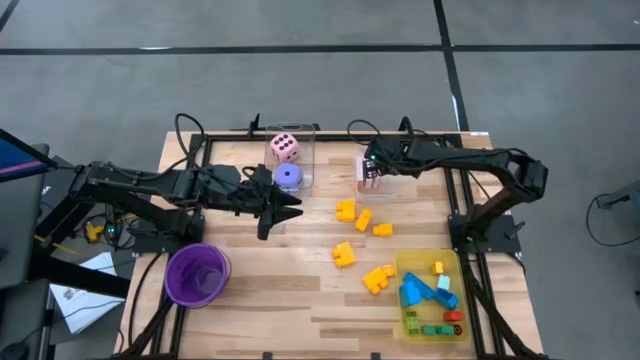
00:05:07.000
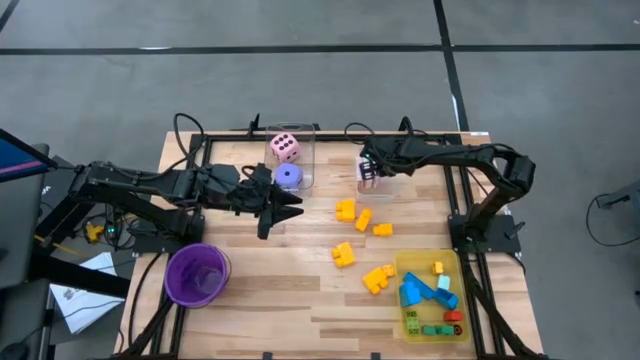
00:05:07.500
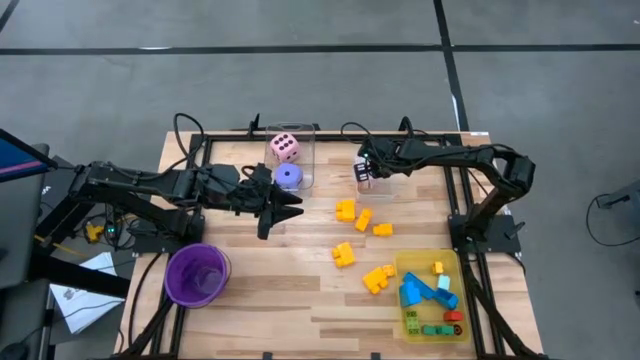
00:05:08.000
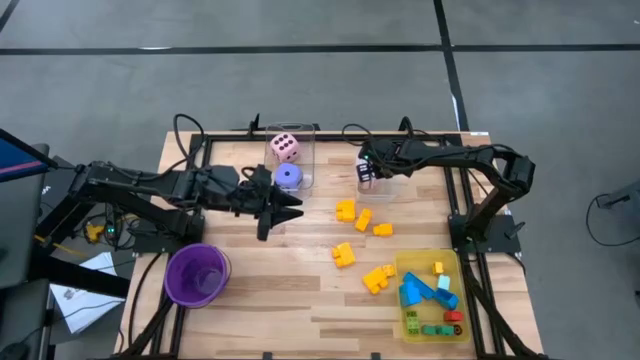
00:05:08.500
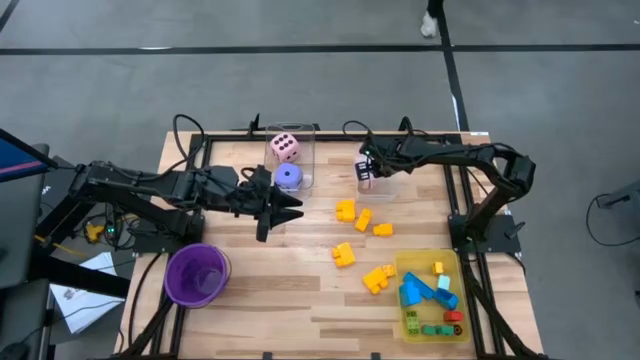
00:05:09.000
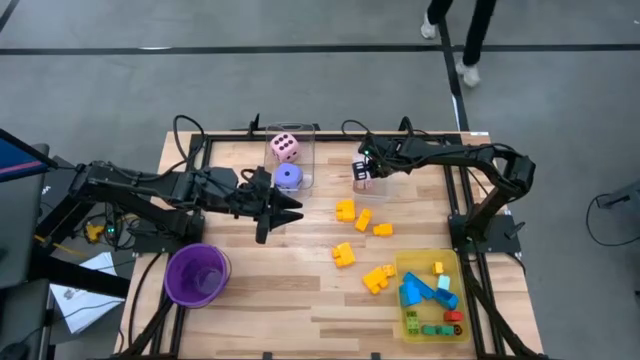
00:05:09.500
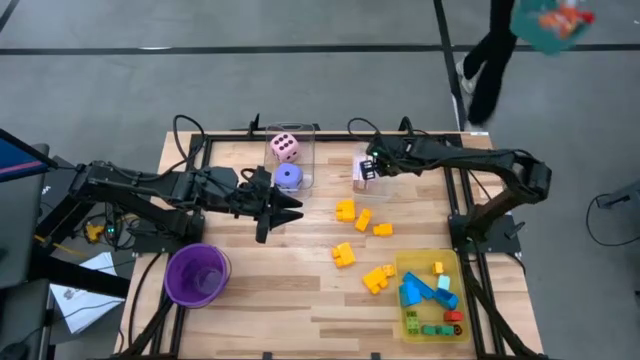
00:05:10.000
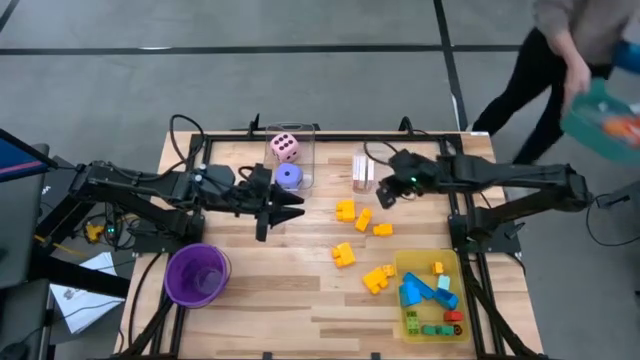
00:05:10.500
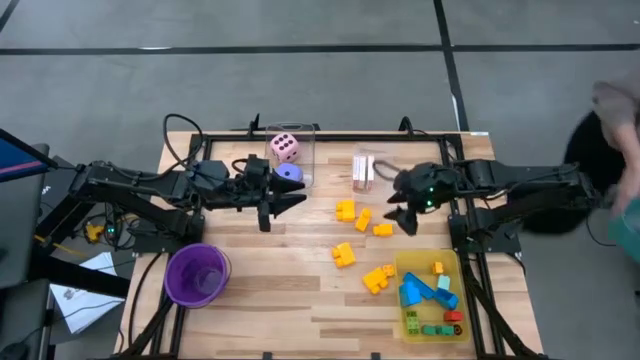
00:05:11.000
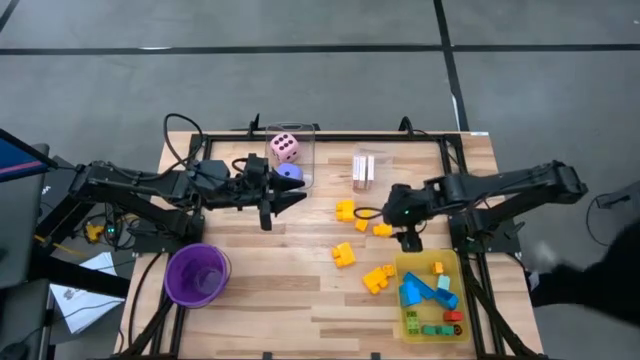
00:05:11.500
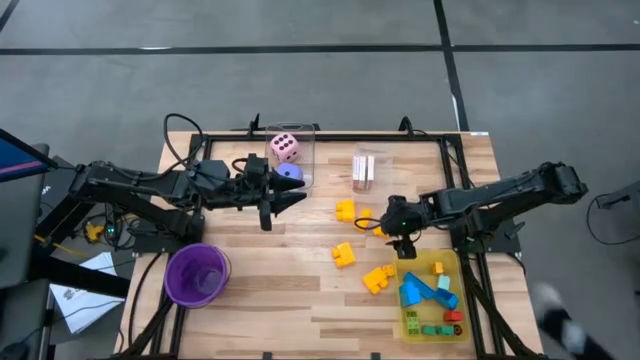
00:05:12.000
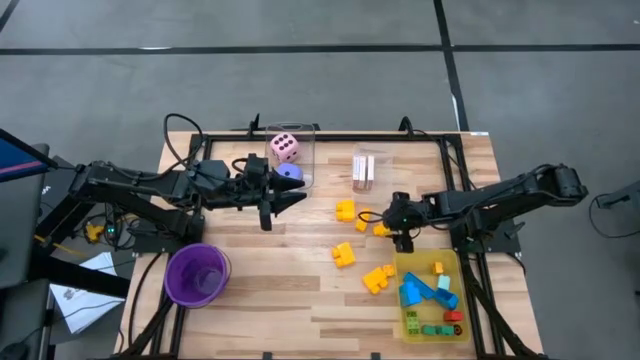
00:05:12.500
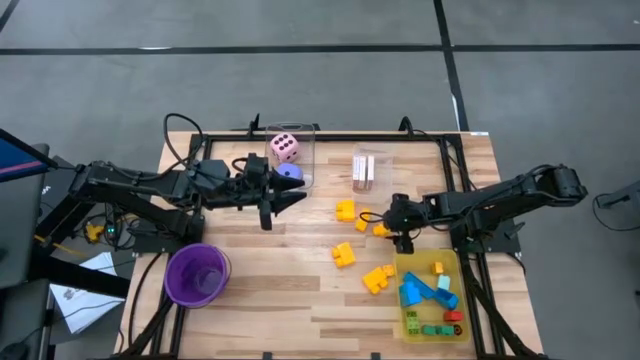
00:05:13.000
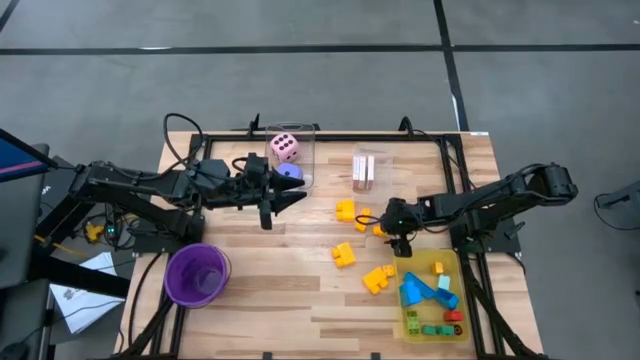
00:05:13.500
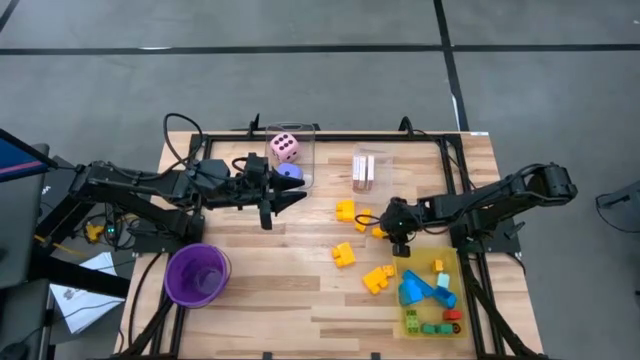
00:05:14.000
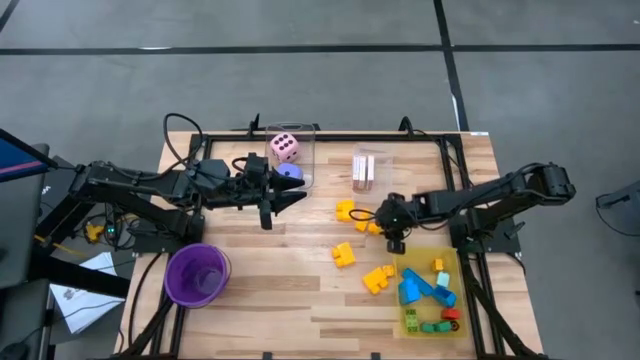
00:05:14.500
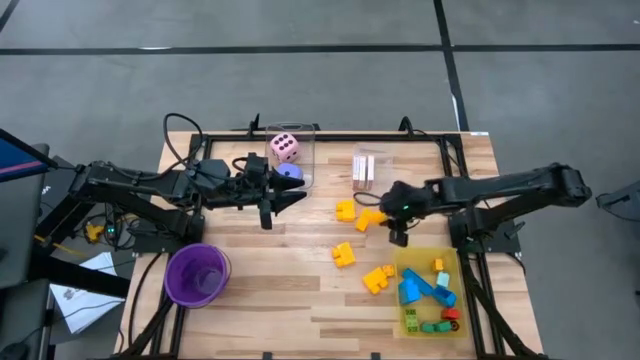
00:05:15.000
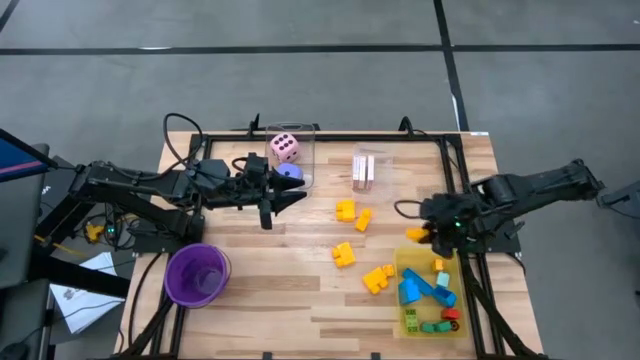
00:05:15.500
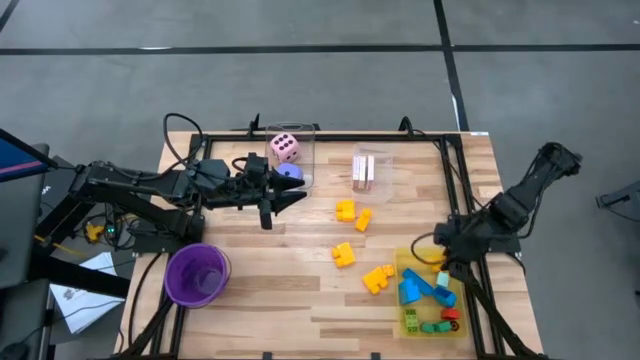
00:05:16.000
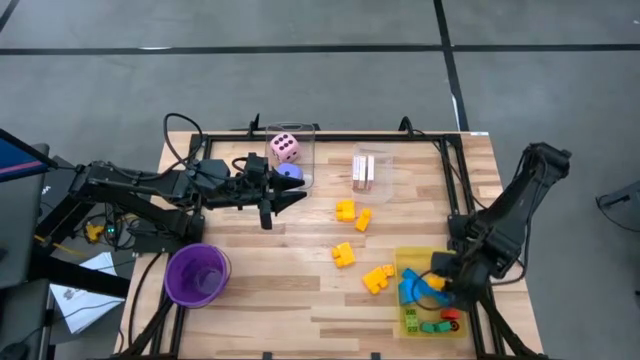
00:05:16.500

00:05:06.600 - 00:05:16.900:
Task: Pick & Place Toys
Put the yellow game piece into the bin

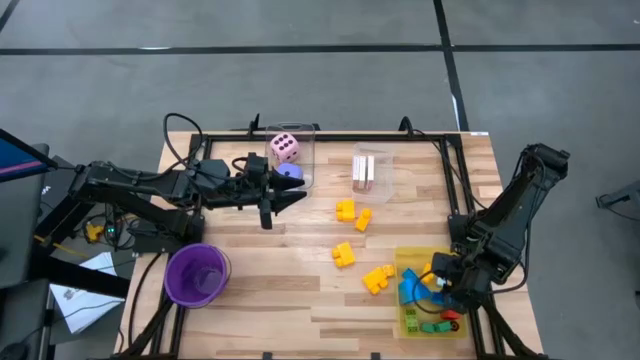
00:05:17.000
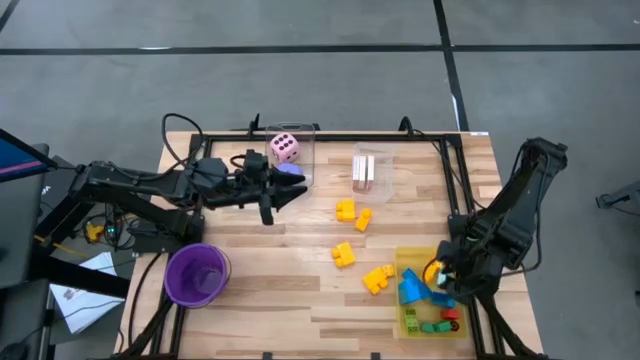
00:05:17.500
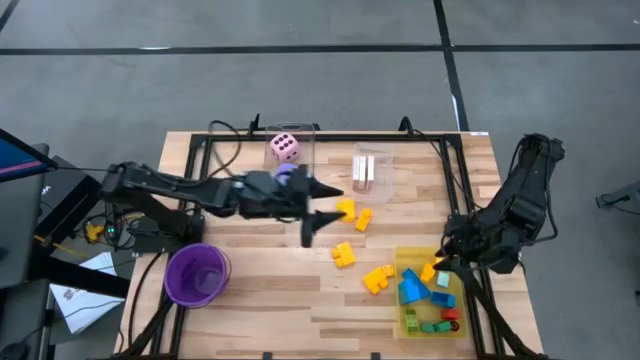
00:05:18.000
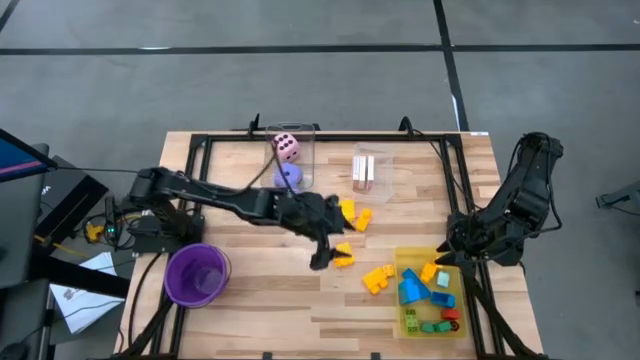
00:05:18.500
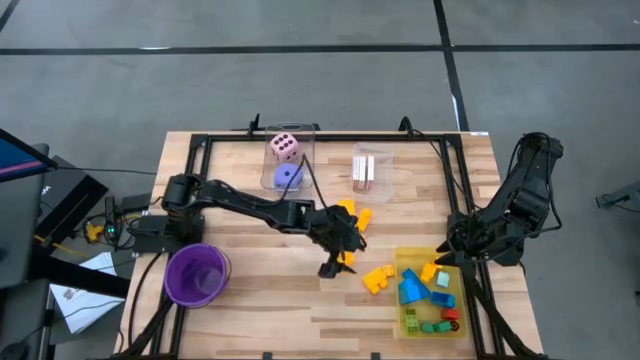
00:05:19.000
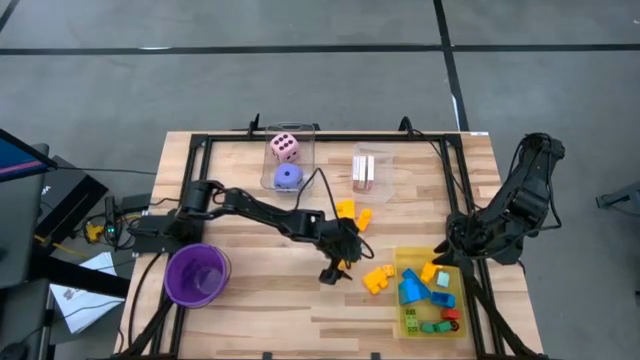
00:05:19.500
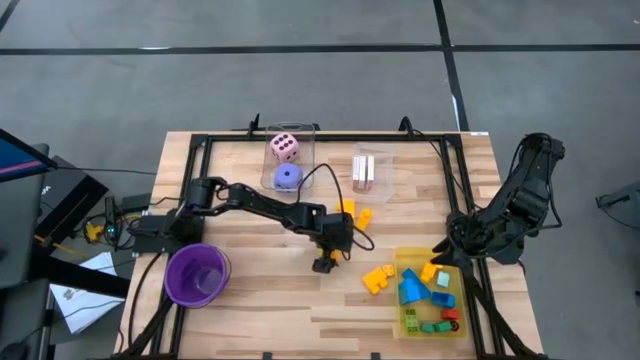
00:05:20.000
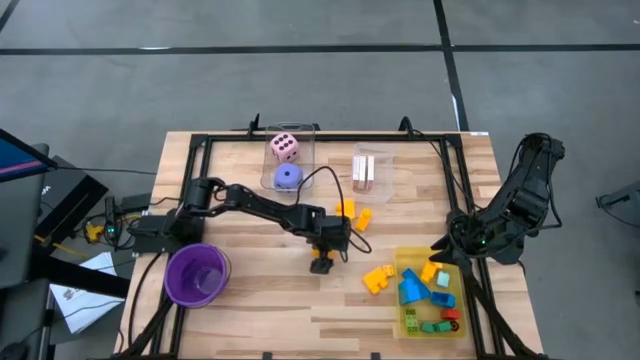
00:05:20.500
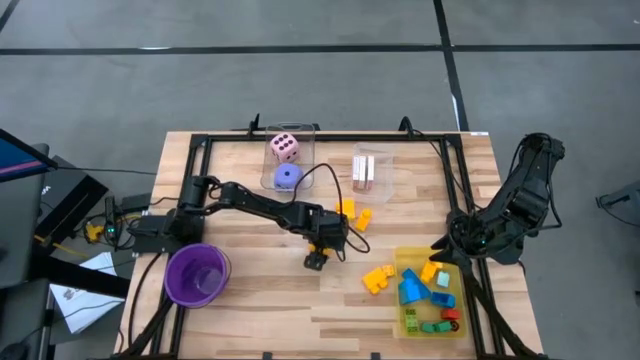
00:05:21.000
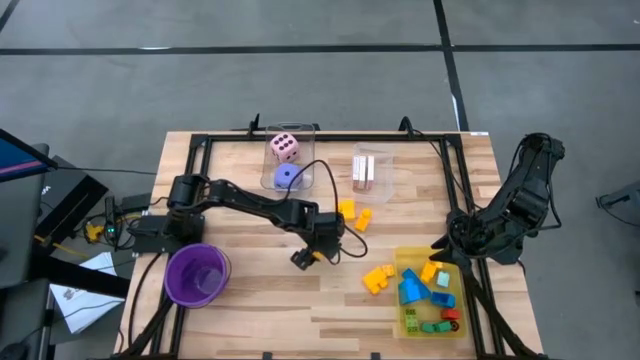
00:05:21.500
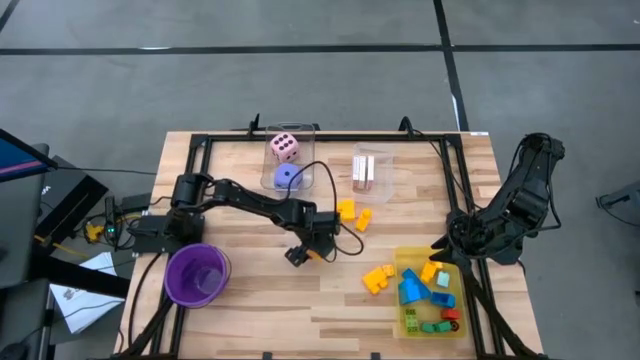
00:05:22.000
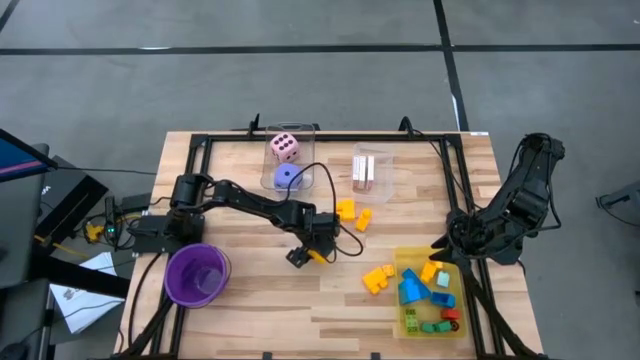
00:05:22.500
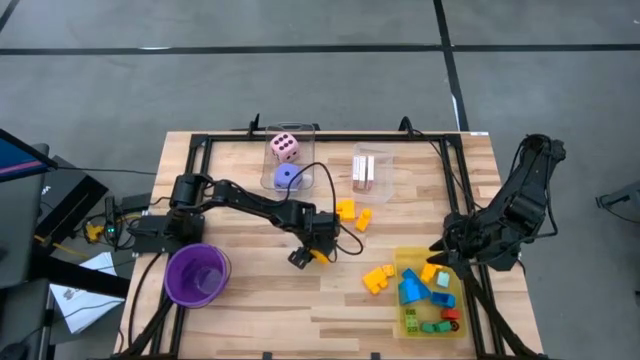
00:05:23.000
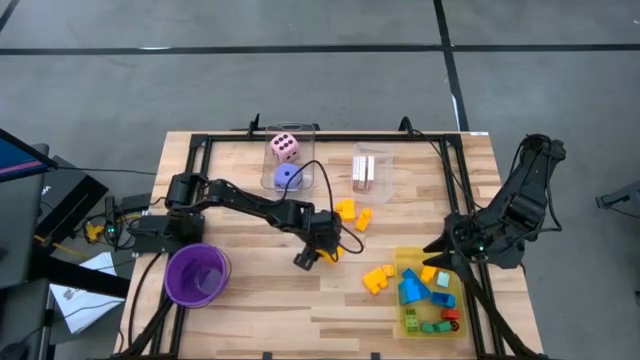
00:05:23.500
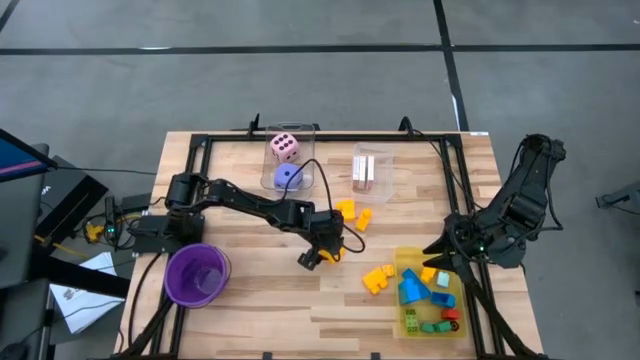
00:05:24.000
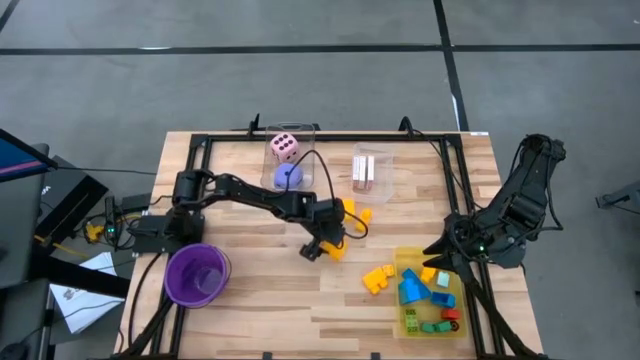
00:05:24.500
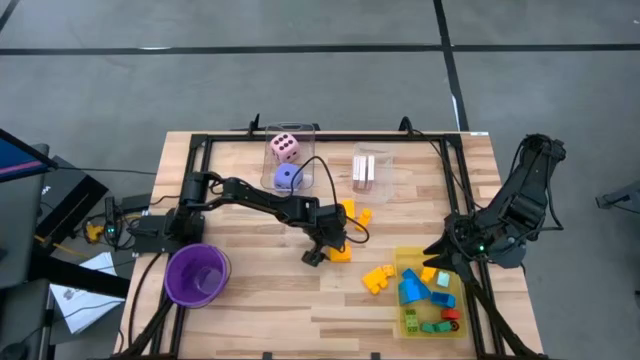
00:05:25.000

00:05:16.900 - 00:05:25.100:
Put the yellow game piece into the bin

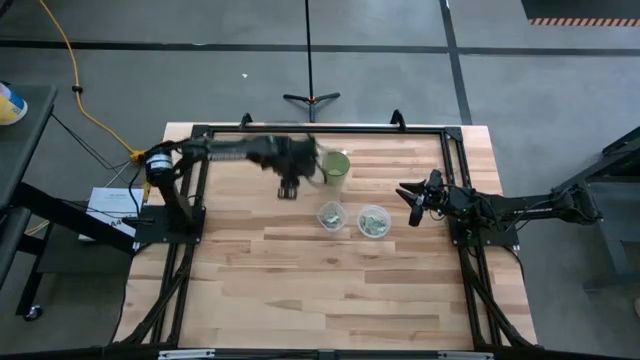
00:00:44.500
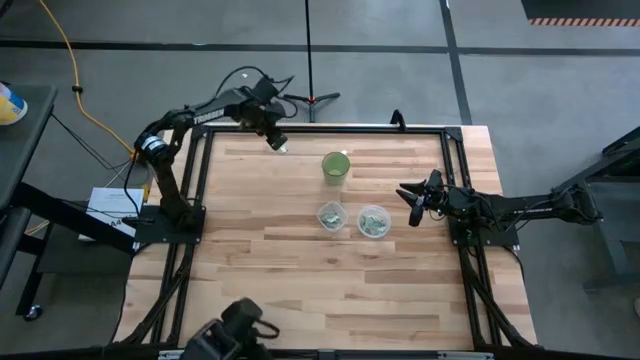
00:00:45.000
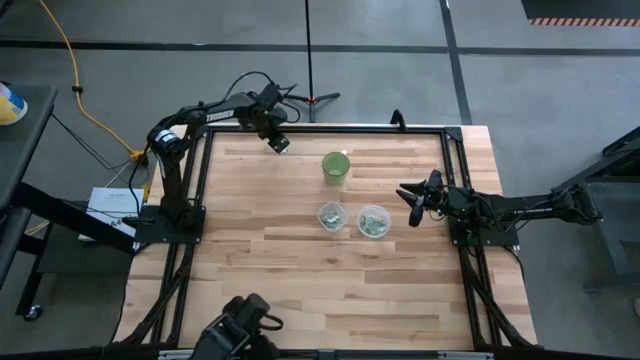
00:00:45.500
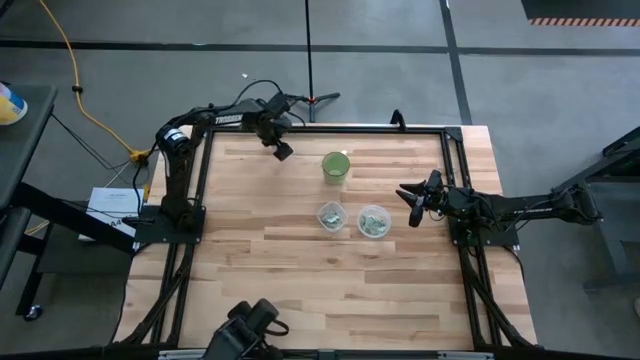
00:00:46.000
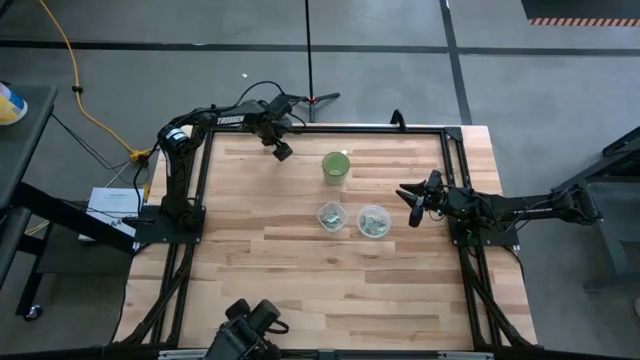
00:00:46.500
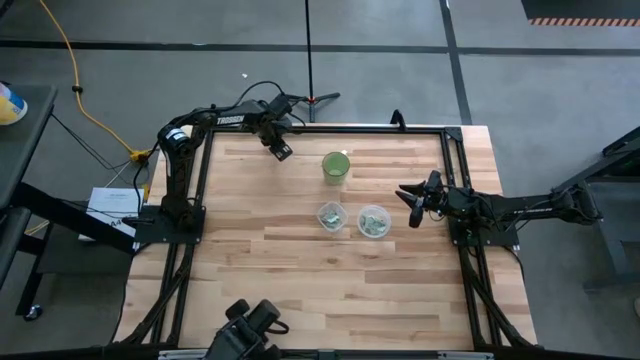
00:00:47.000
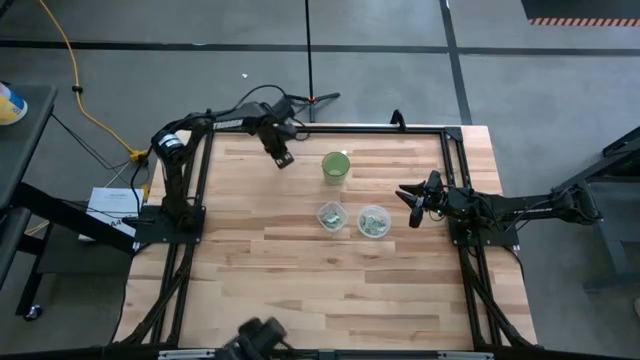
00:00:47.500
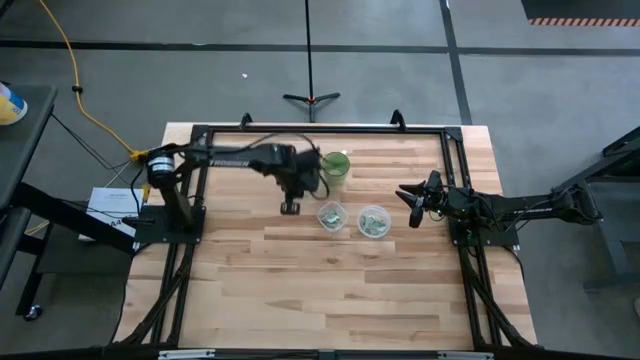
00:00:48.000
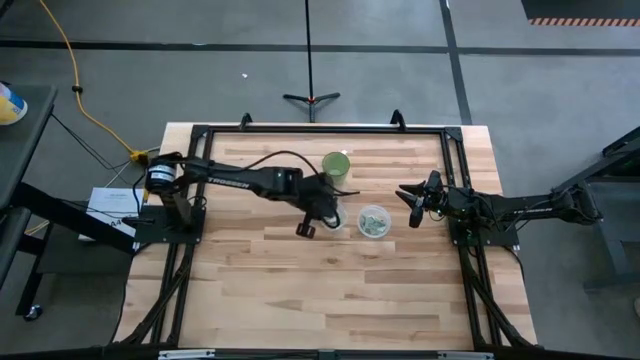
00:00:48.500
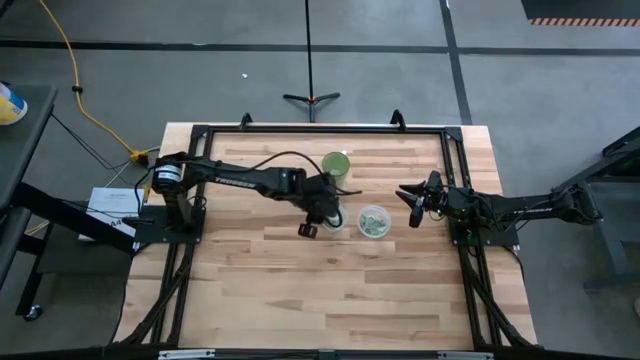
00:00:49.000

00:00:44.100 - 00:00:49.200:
Task: Pick and place items into bin
Put the stevia packet into the left transparent bin
